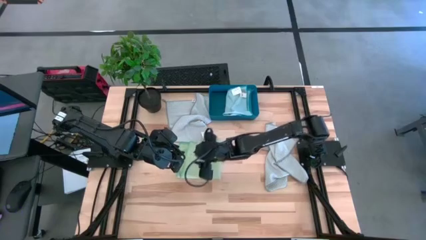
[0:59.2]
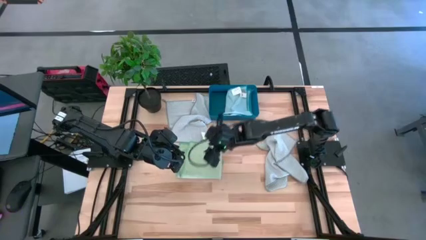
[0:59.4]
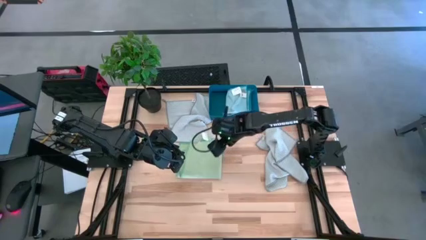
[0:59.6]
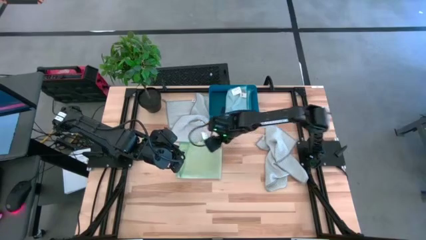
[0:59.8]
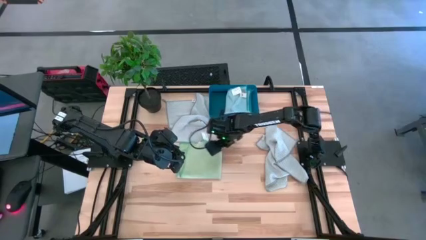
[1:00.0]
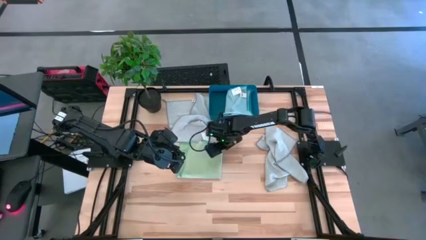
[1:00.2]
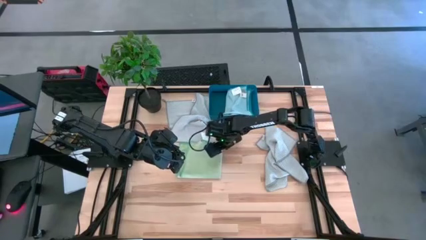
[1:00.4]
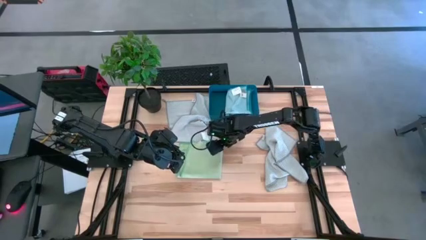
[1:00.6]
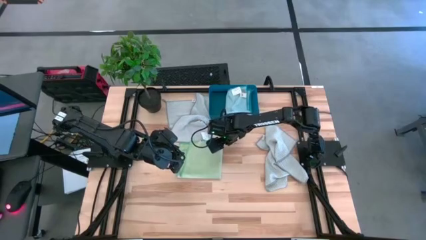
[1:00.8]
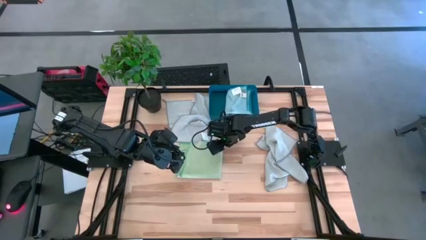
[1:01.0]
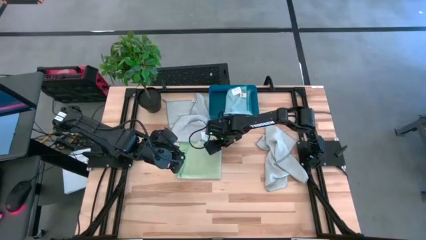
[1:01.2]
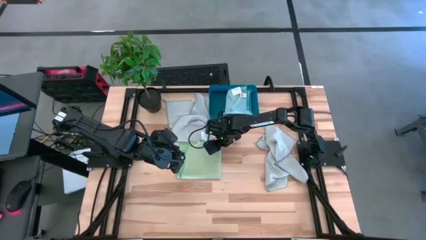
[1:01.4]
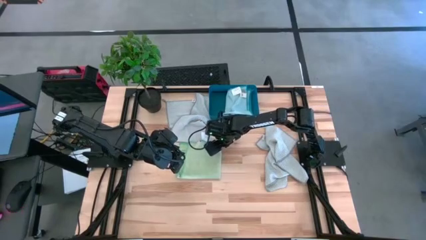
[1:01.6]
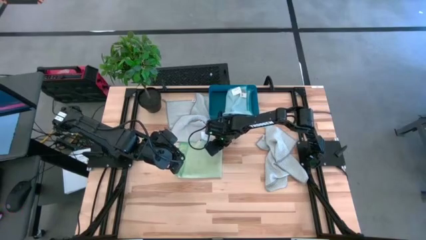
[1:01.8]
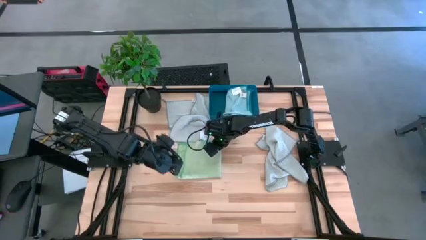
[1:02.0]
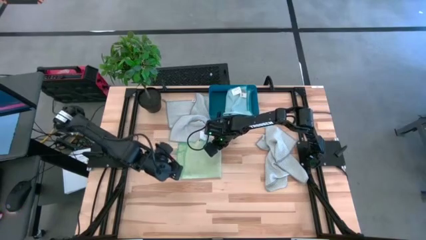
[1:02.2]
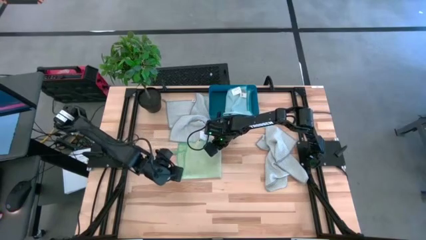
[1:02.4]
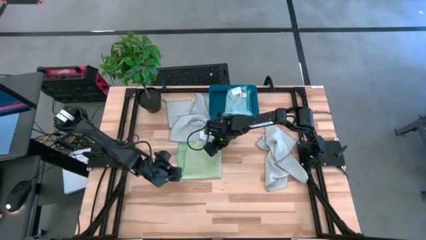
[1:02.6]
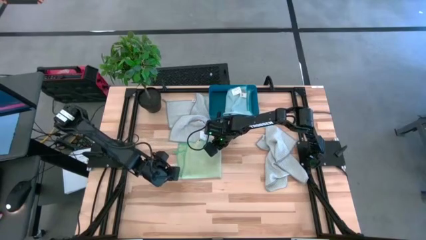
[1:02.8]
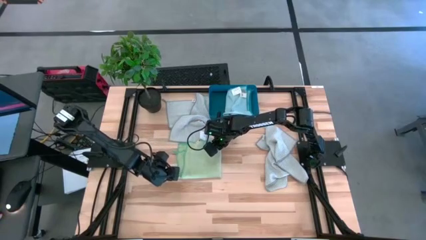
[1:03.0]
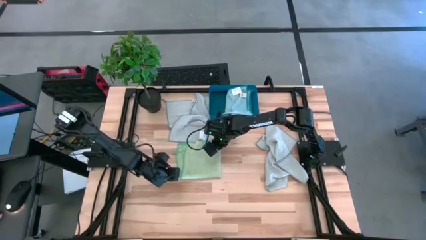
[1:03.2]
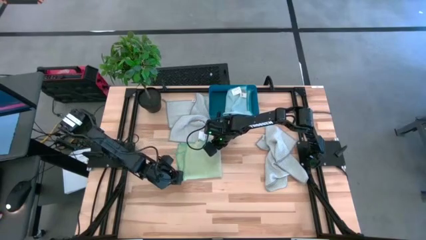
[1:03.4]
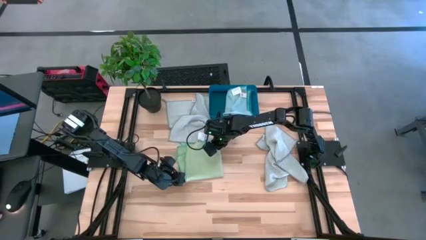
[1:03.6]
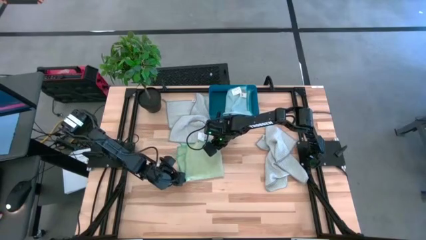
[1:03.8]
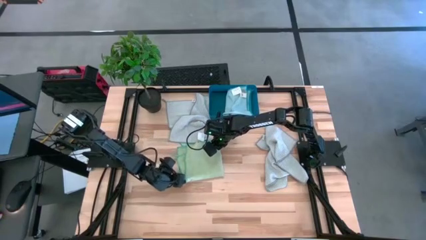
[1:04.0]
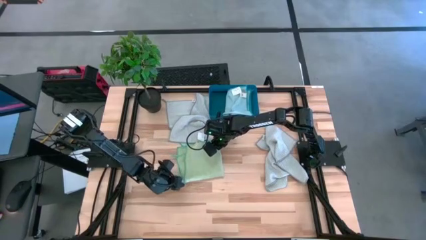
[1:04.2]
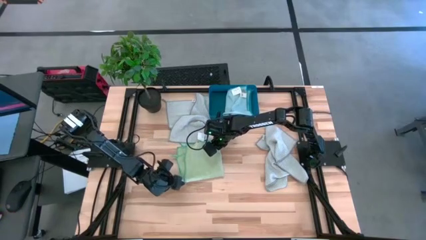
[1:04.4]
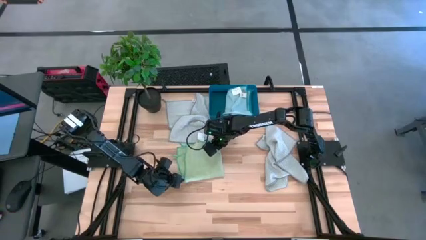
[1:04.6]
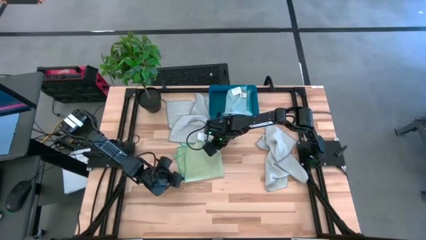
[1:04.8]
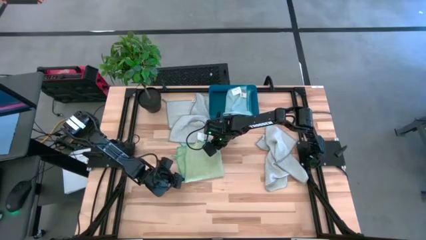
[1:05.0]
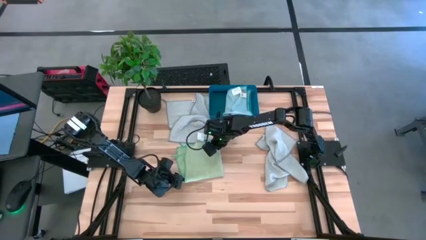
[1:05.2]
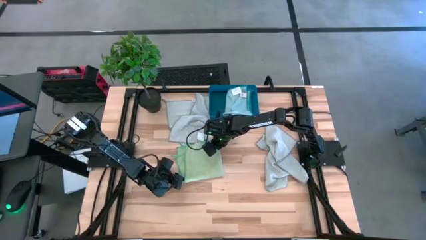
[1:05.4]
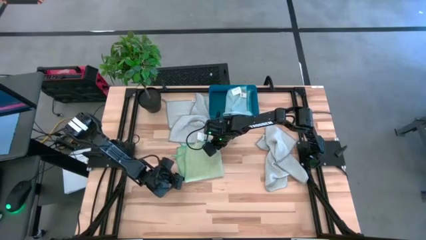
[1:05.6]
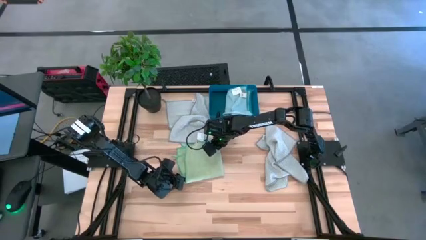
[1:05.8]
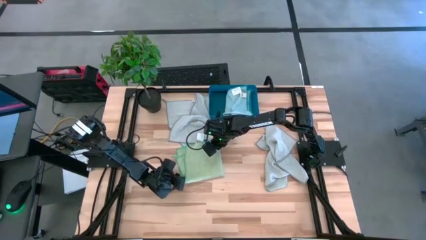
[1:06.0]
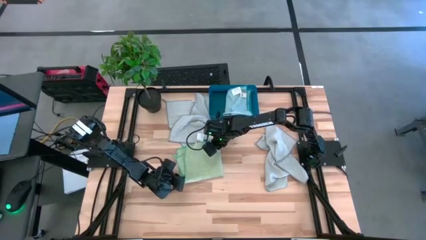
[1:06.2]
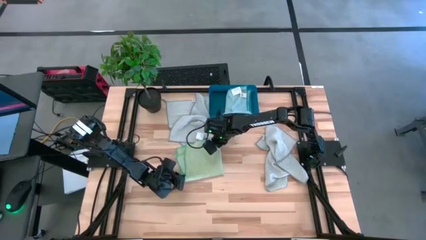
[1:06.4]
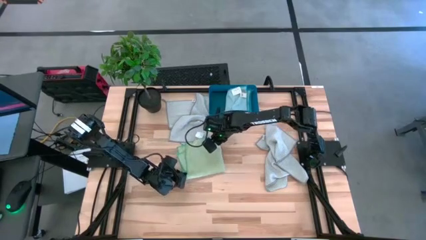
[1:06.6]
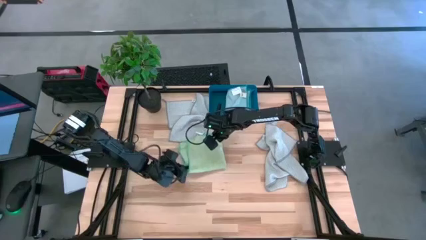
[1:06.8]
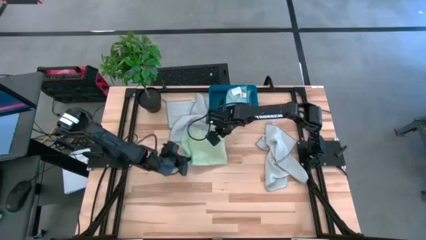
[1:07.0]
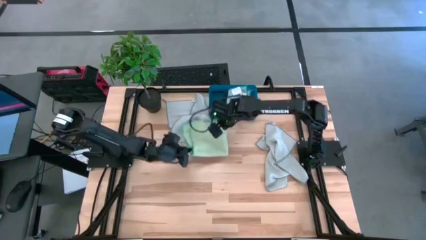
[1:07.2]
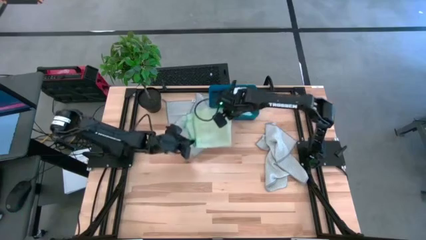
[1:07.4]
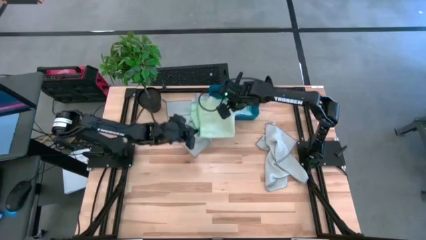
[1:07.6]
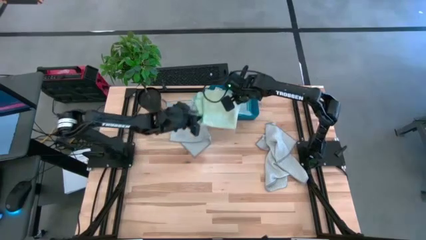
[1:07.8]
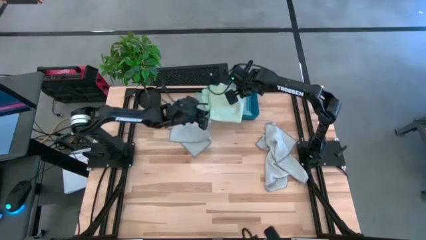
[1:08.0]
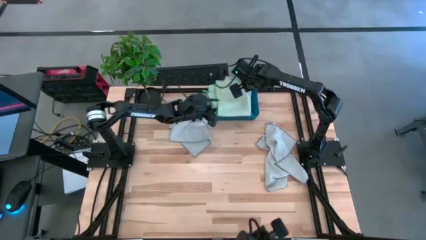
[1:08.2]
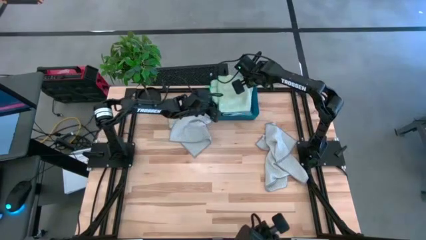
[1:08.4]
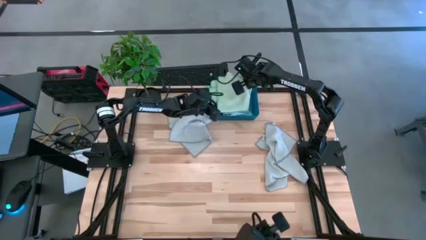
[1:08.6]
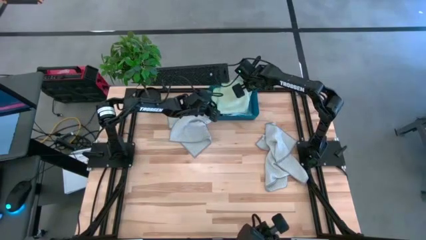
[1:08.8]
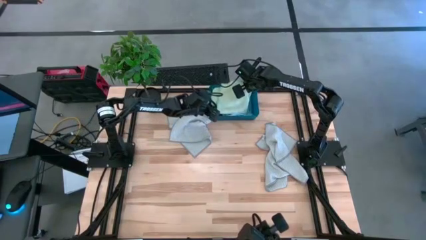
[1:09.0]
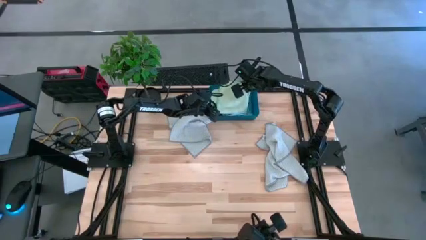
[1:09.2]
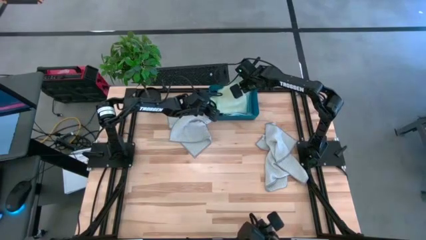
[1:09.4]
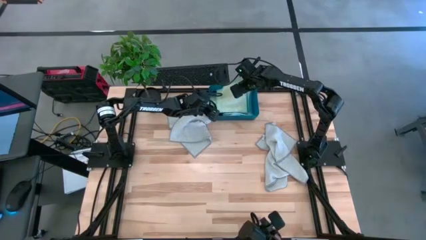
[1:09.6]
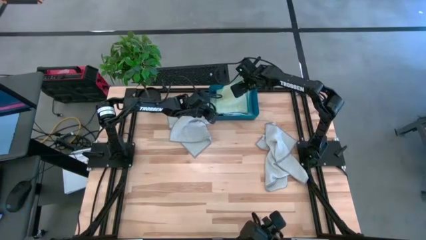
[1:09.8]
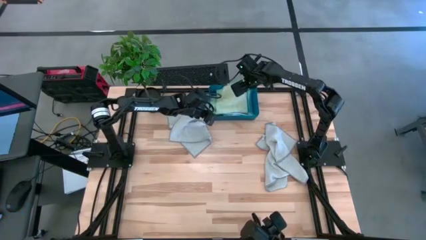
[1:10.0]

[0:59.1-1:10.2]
Task: Fold microfiber towels
Put the green towel into the blue bin

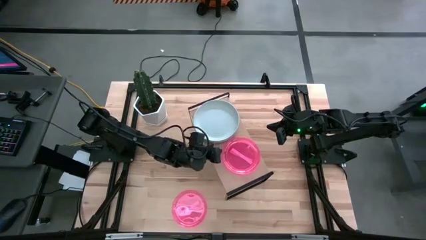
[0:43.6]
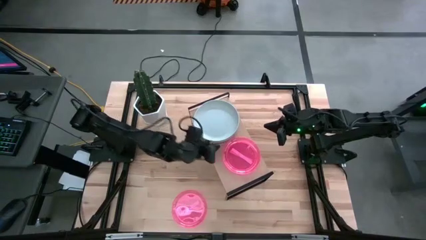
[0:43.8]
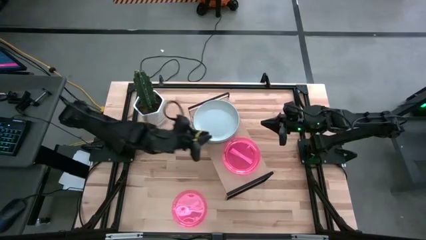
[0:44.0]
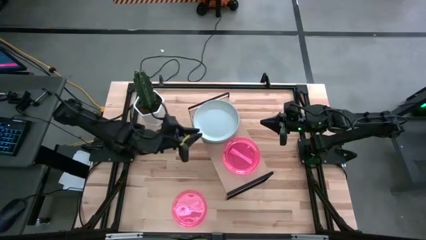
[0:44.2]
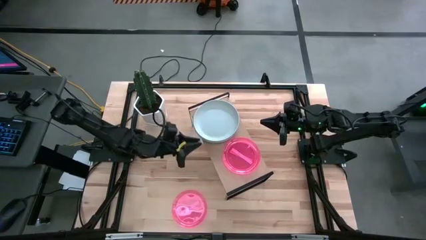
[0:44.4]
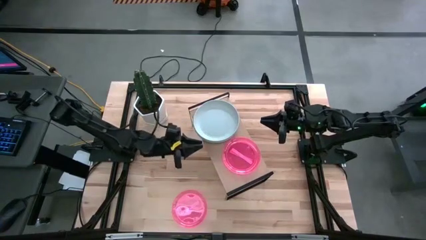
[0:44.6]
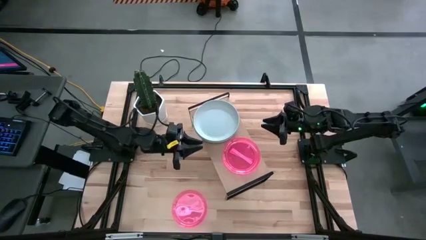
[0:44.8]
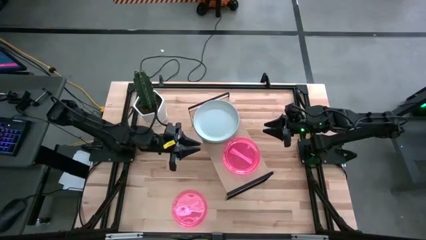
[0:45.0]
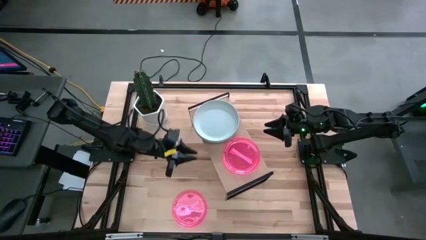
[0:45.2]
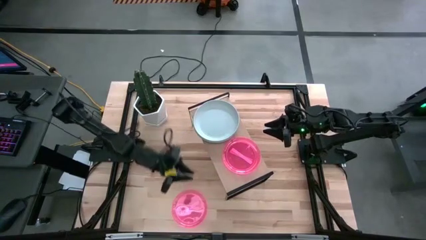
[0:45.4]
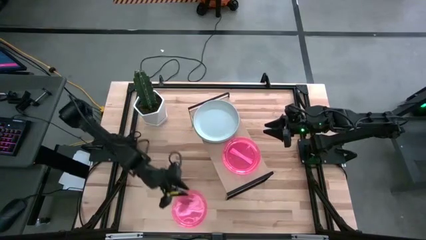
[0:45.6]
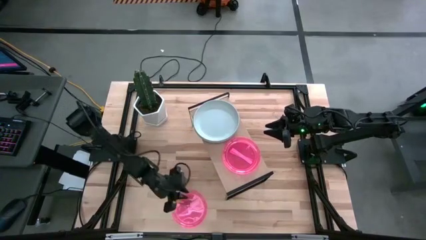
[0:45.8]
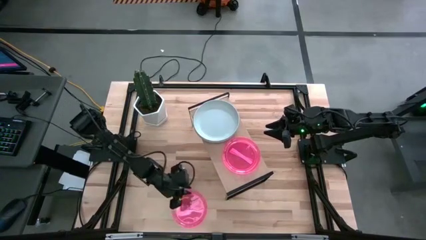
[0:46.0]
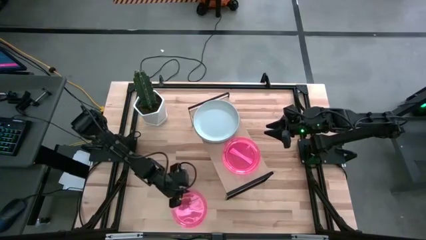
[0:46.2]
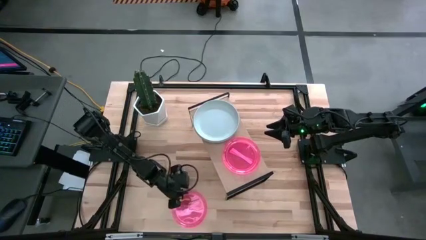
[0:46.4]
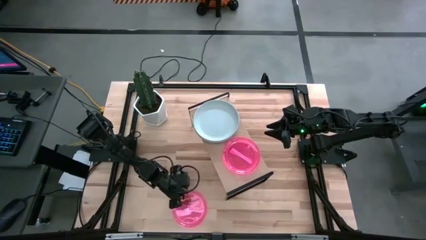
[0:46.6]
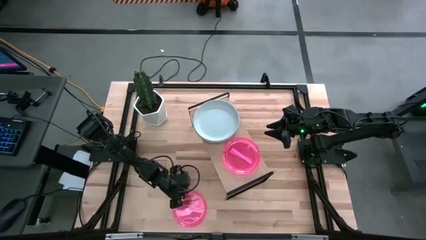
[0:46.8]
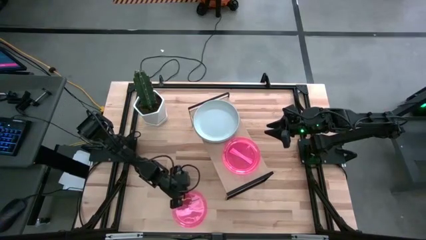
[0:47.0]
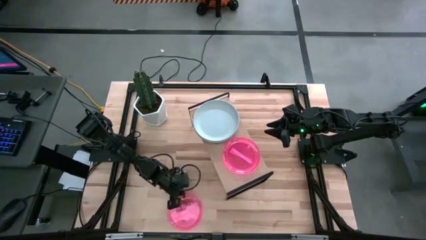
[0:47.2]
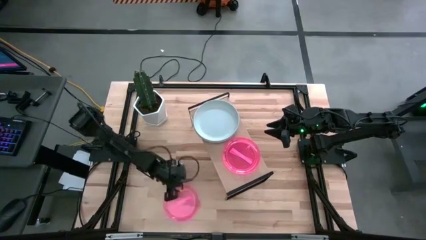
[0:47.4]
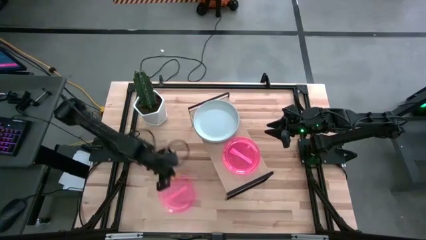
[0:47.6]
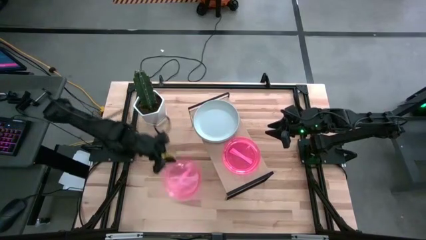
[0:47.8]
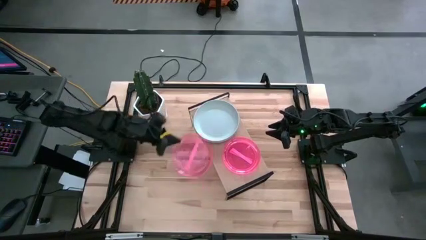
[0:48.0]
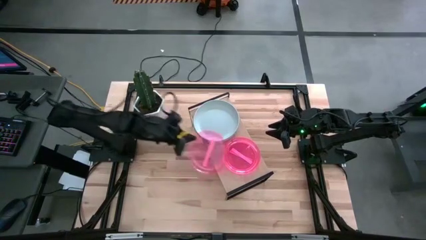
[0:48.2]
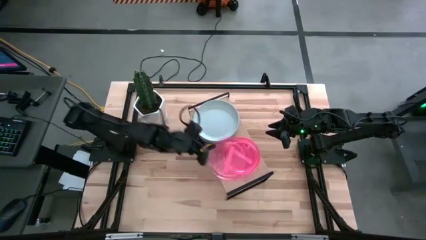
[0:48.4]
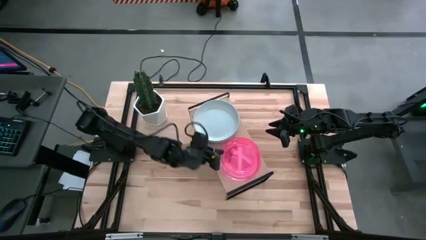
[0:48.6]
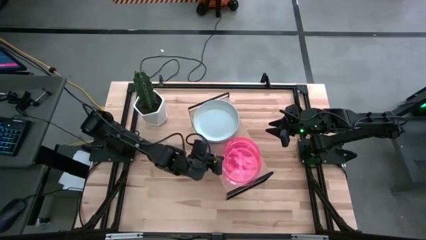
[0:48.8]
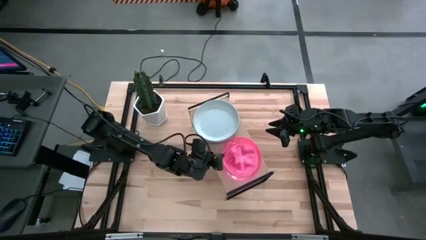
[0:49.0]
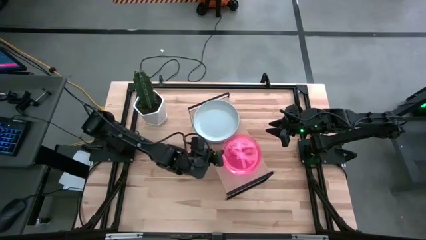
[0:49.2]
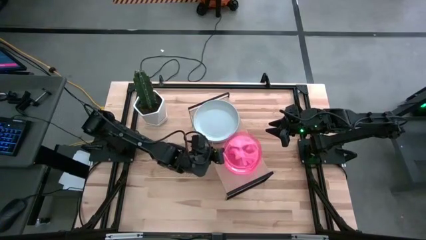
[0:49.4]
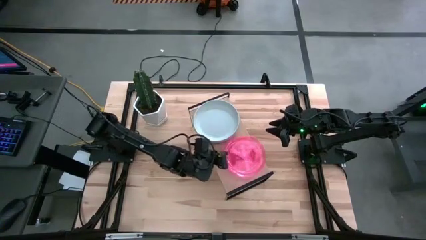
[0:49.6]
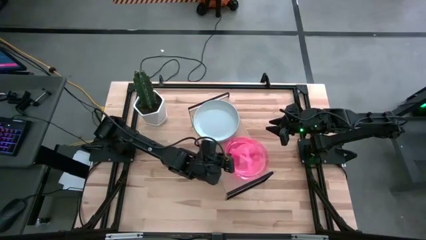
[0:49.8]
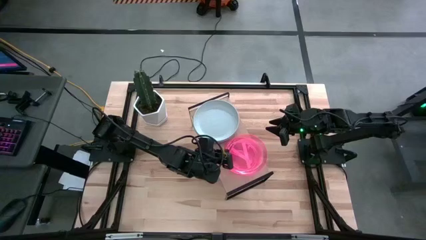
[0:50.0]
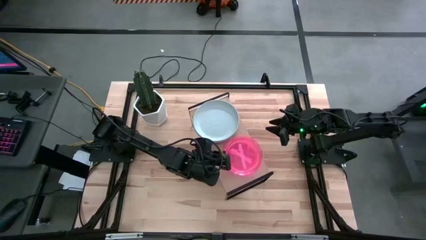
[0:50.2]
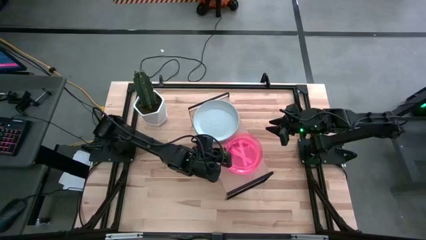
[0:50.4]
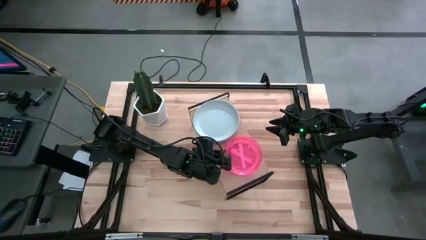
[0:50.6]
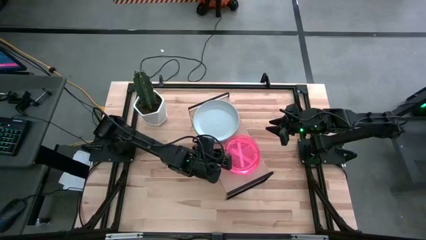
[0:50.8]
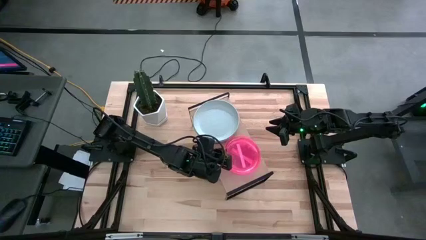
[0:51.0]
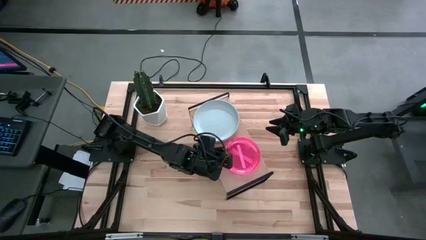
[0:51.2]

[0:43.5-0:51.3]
Task: Place and stack plates onto a shelf
Stack the pink transparent plate on top of the pink plate on the shelf
